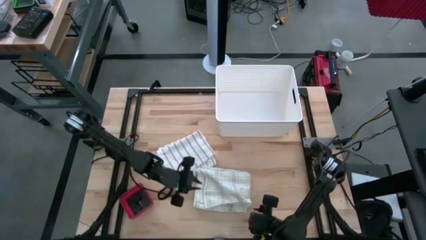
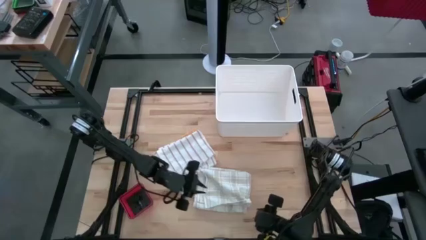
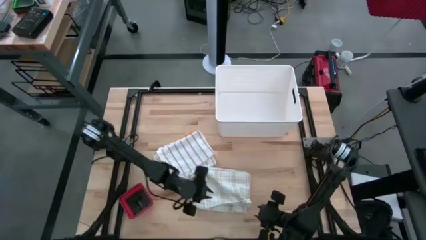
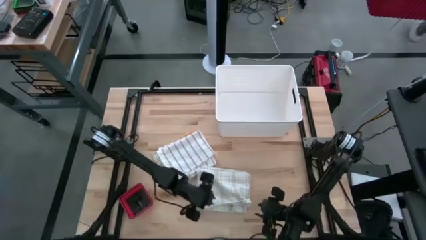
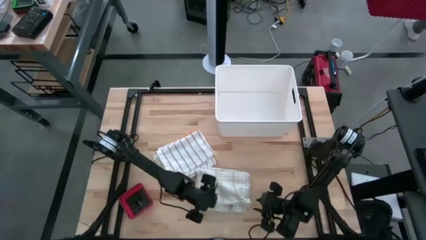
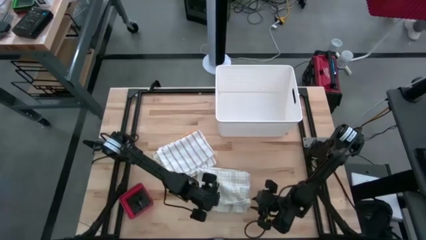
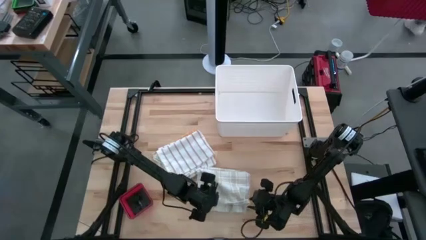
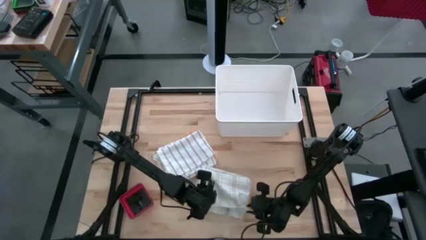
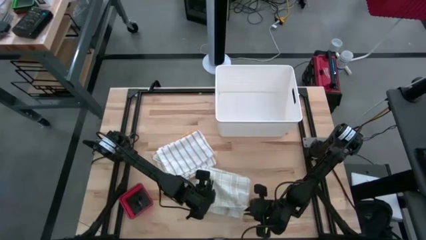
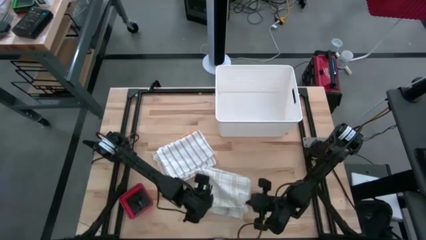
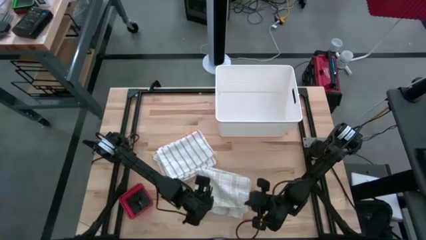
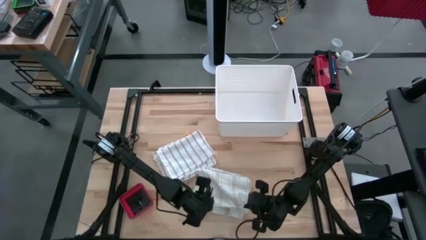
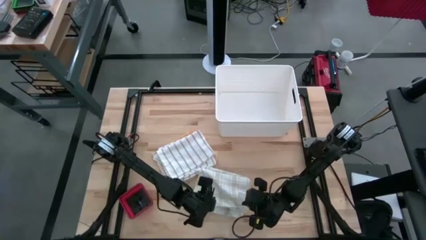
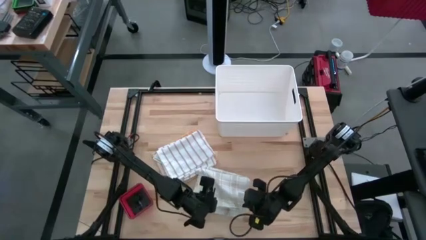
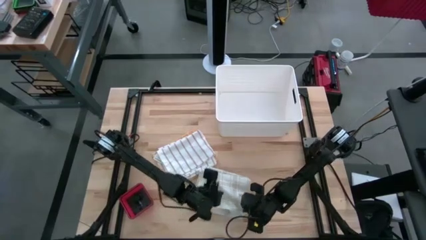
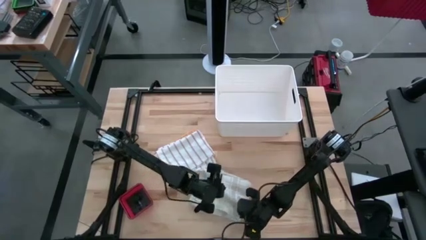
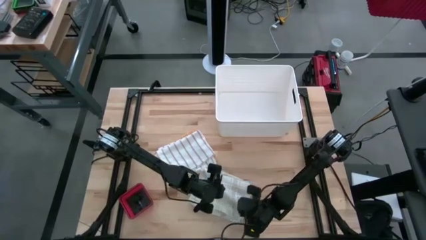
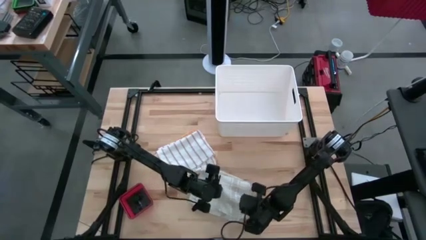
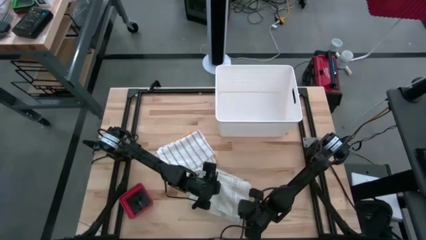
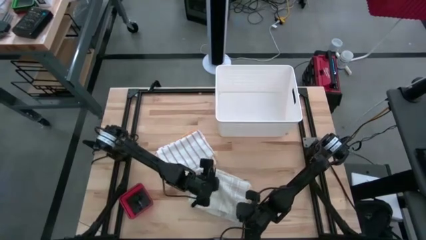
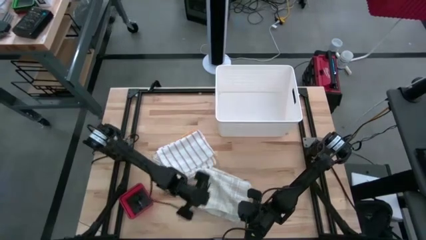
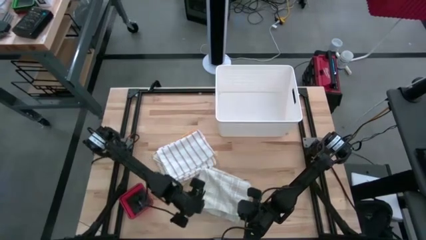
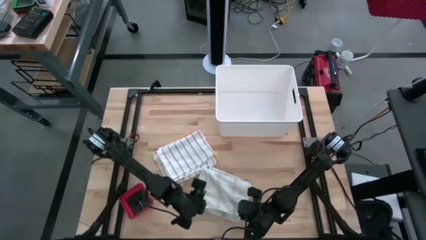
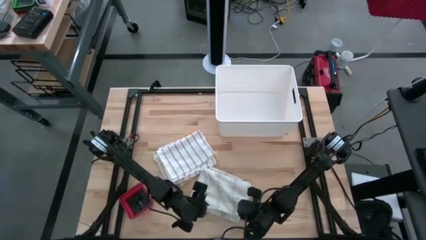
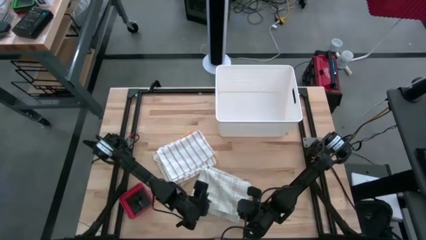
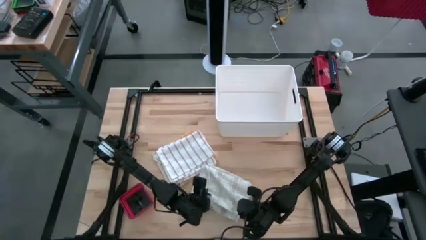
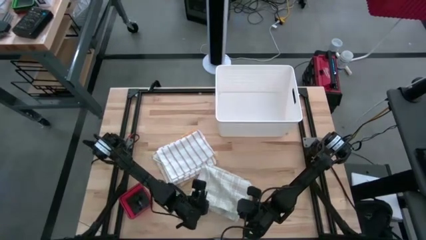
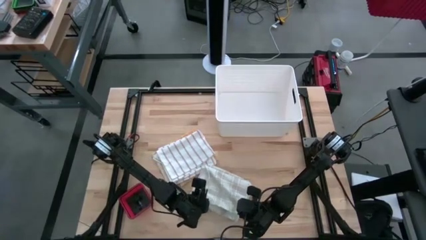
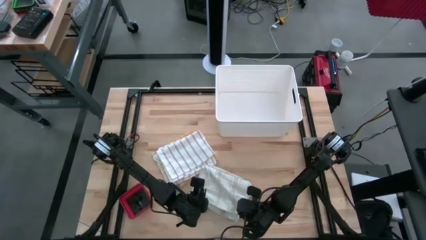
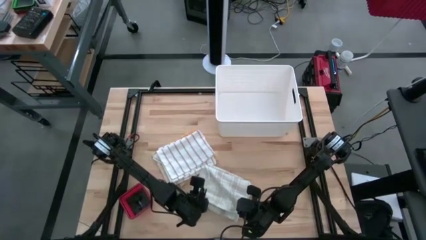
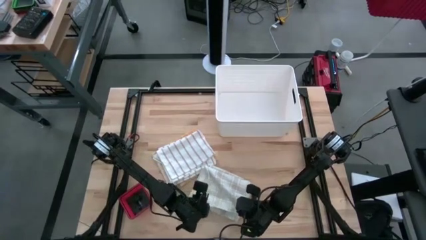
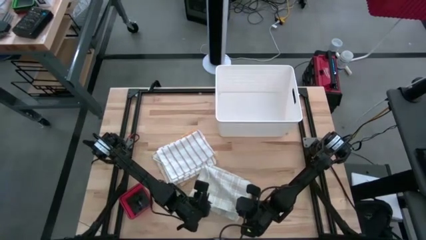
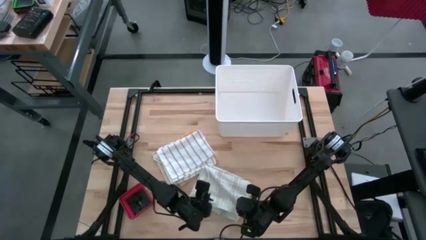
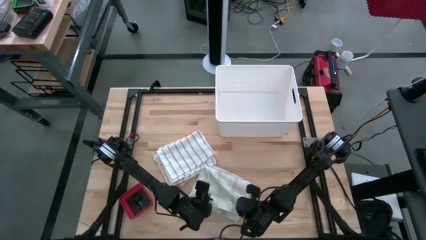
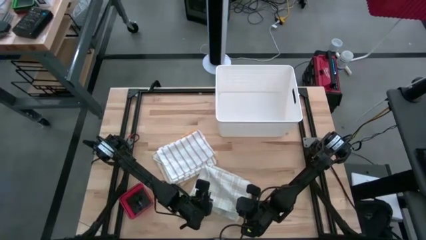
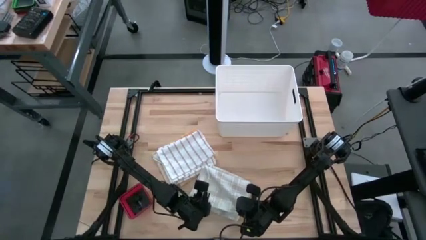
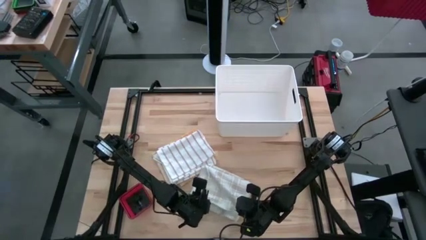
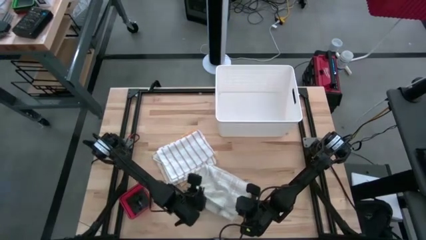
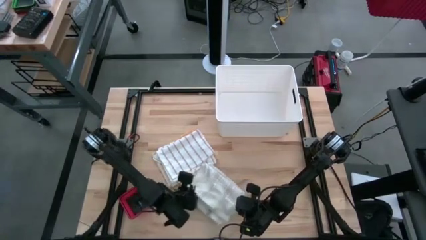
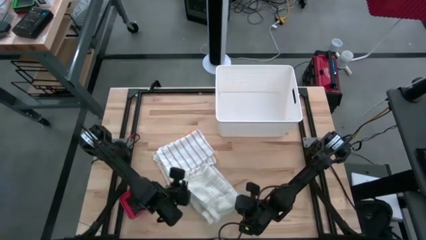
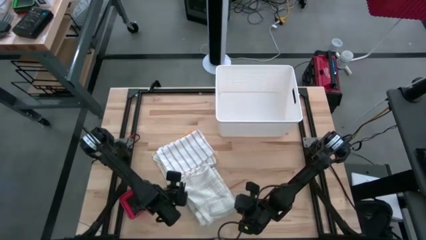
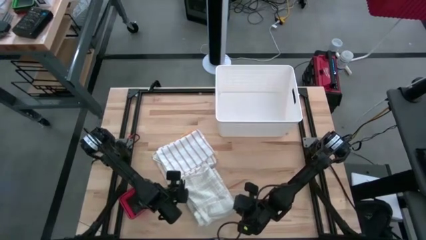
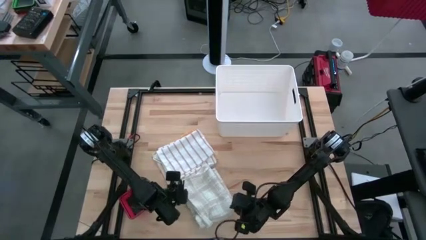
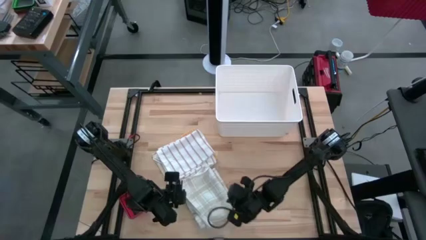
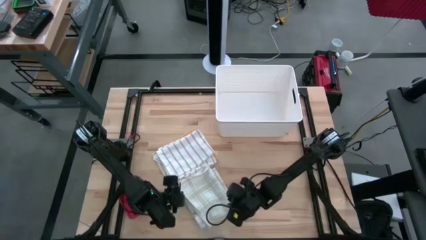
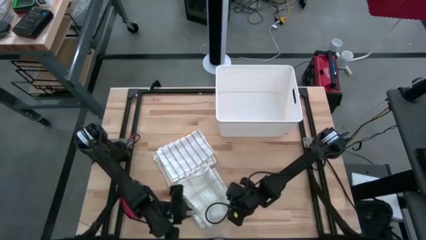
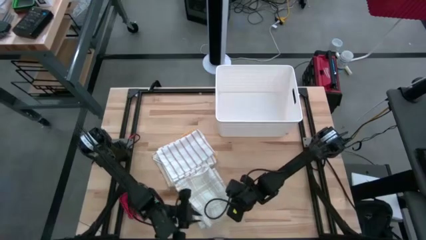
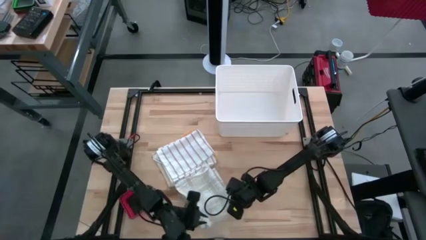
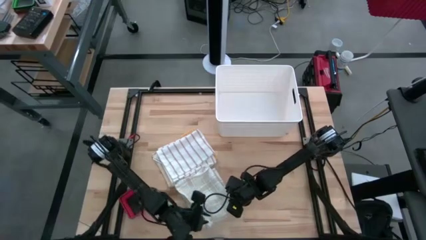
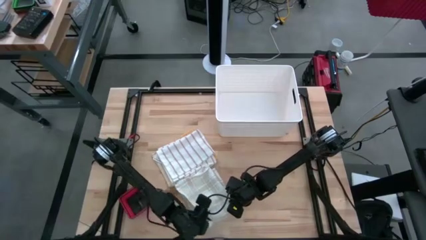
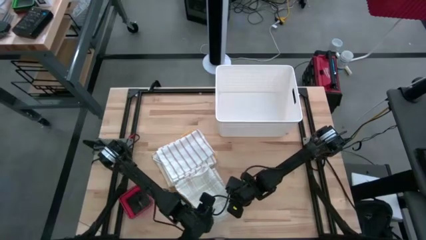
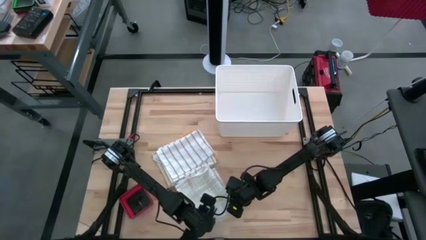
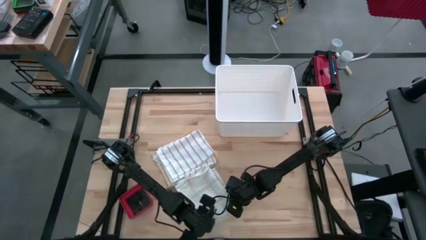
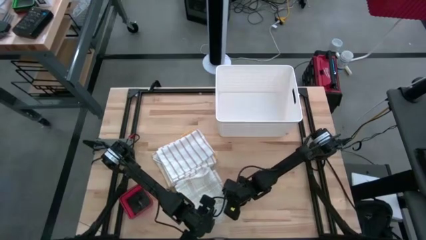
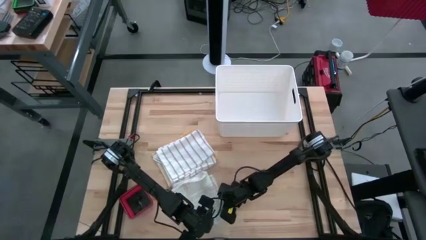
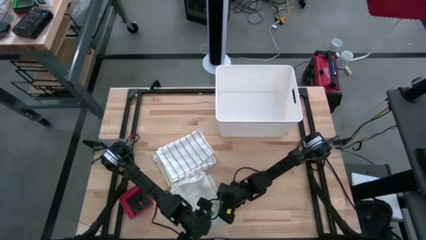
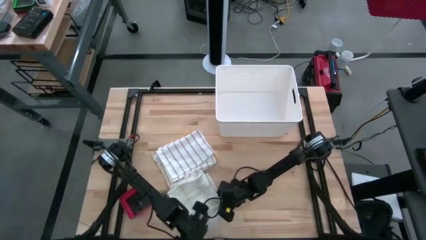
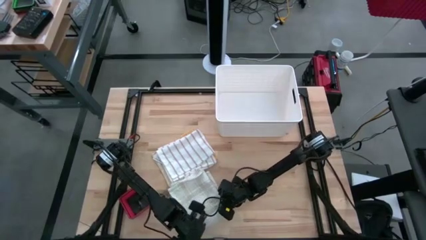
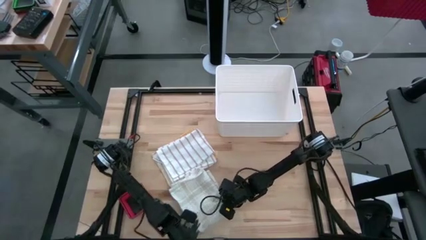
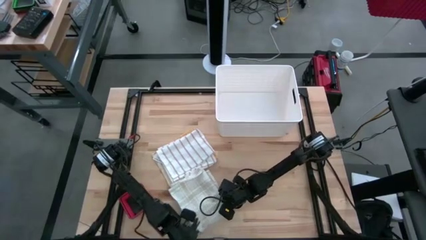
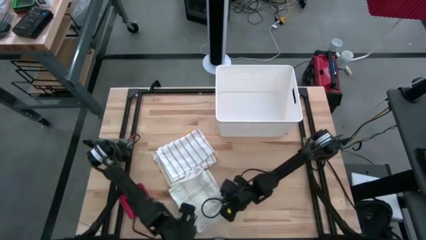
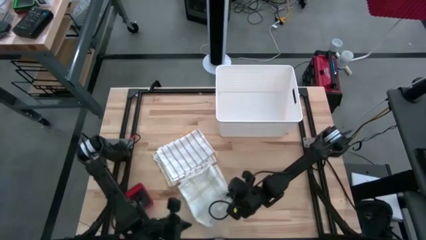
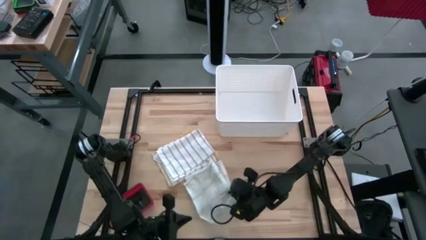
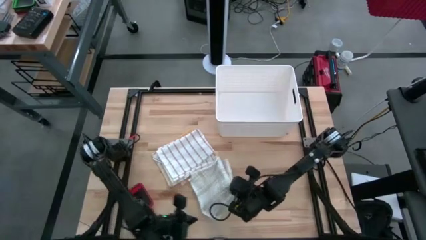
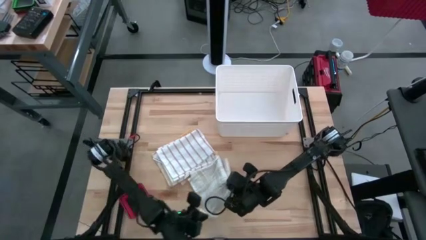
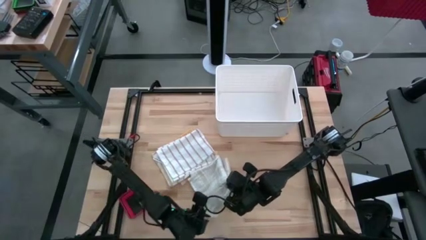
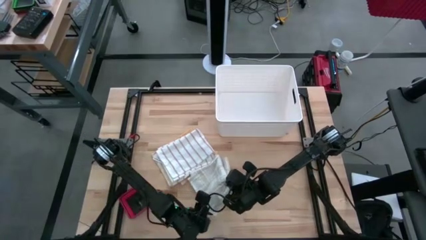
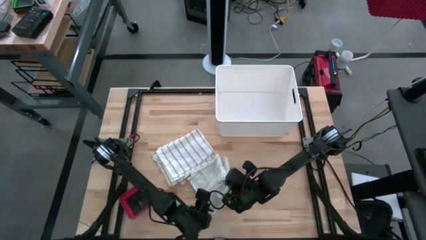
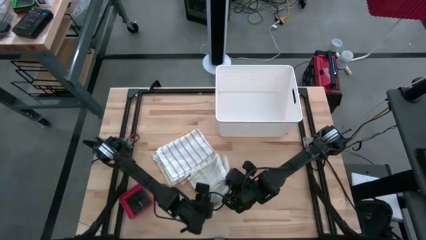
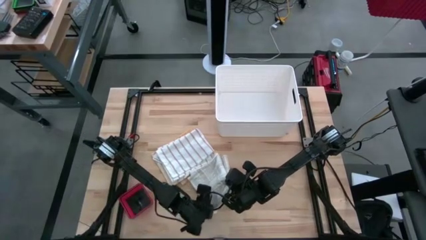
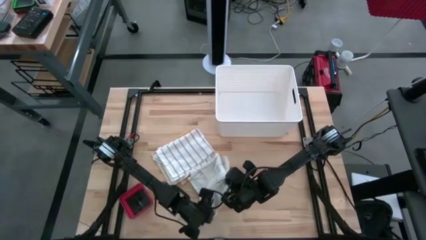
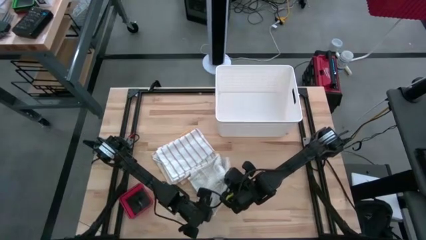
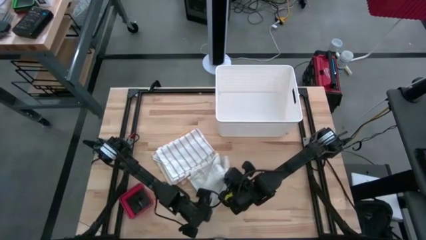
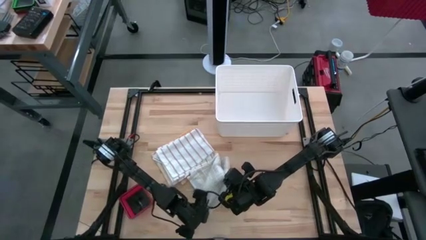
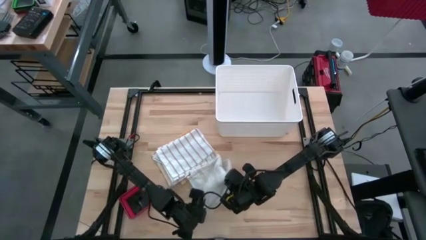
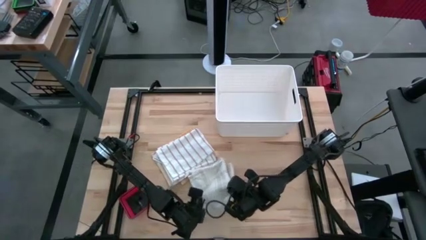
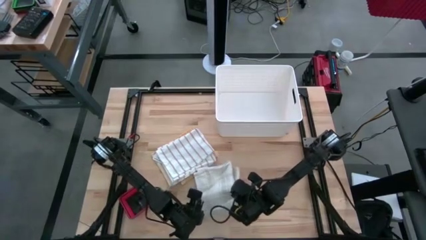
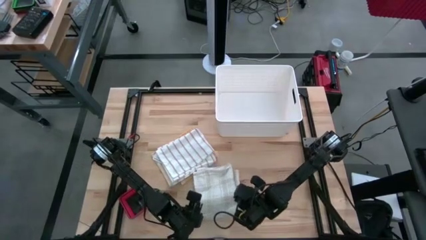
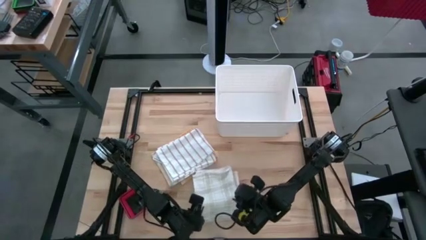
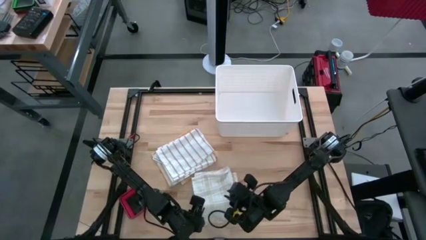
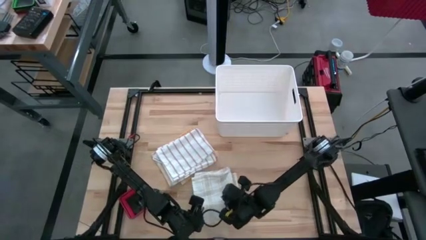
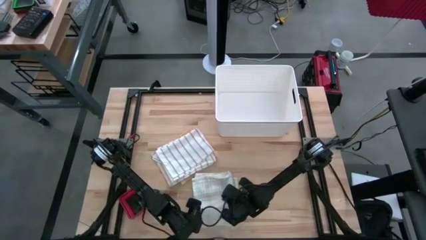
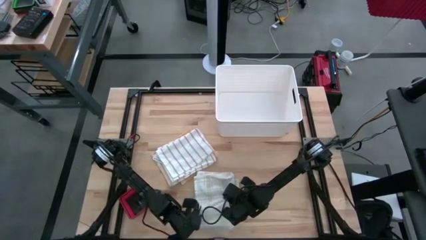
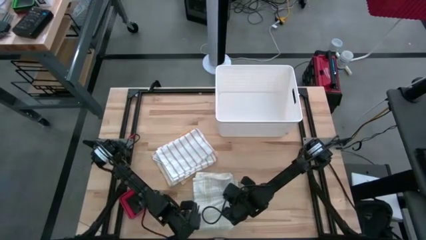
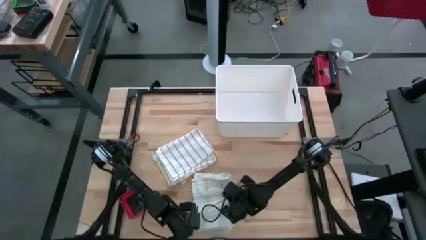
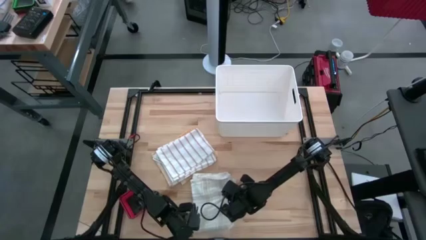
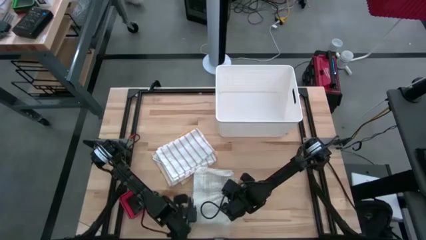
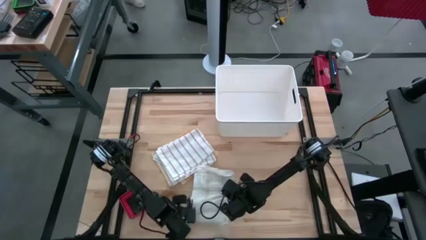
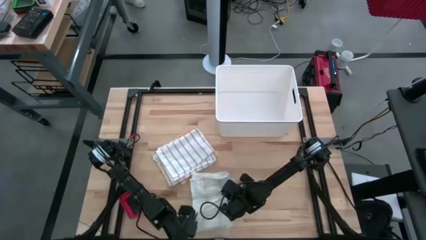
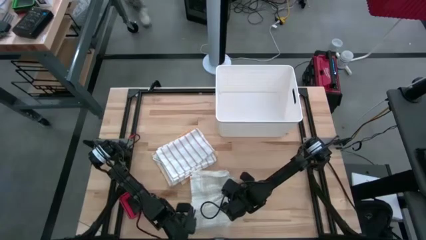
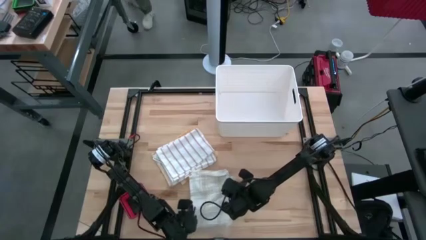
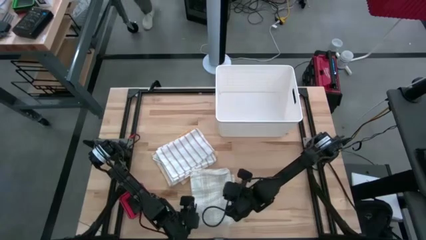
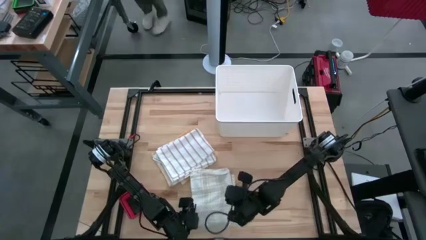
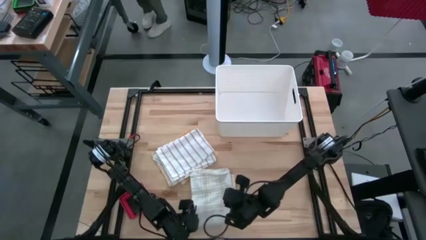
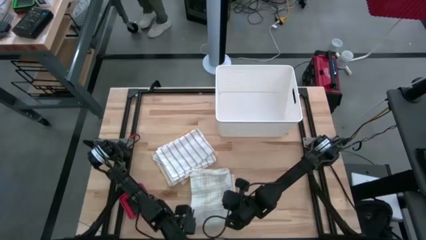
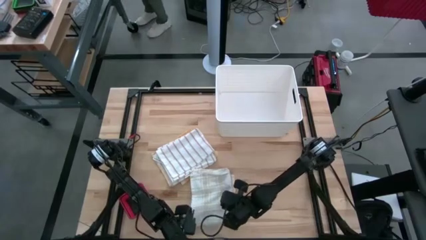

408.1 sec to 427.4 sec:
Task: Fold towel
Fold the light gray patterned towel
